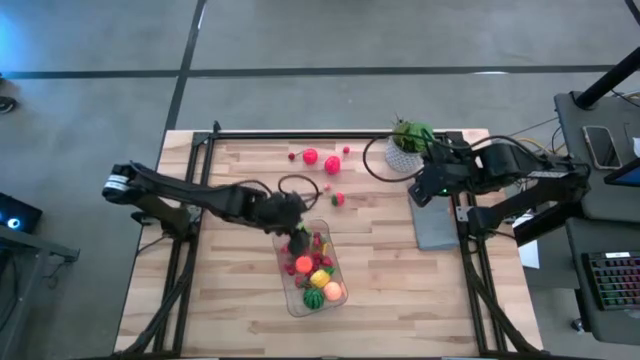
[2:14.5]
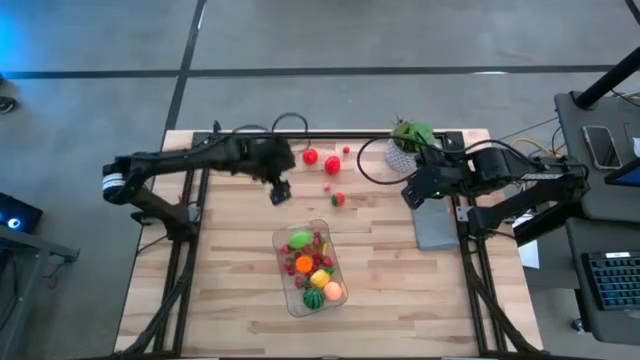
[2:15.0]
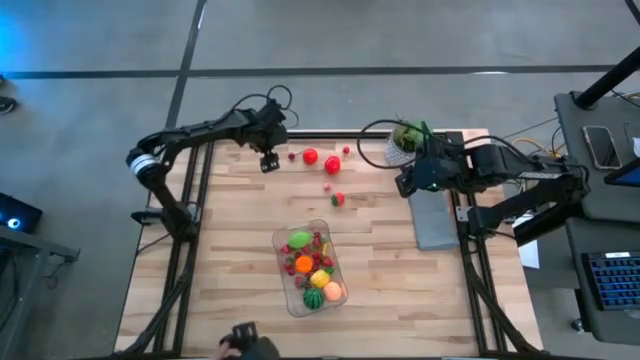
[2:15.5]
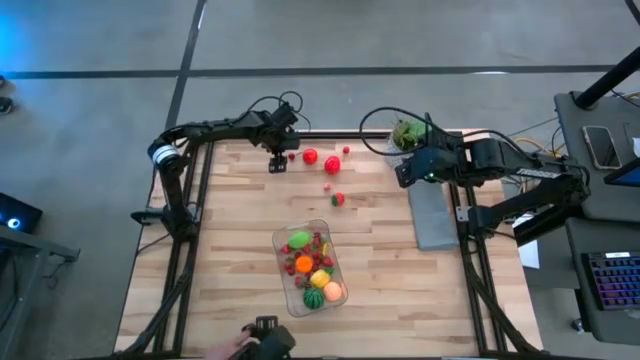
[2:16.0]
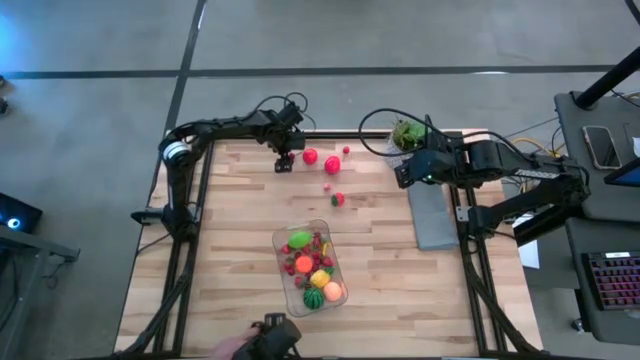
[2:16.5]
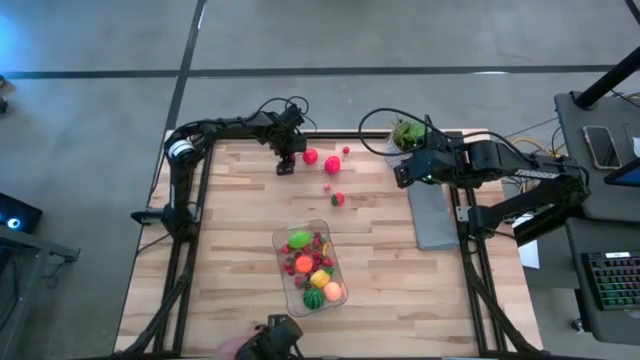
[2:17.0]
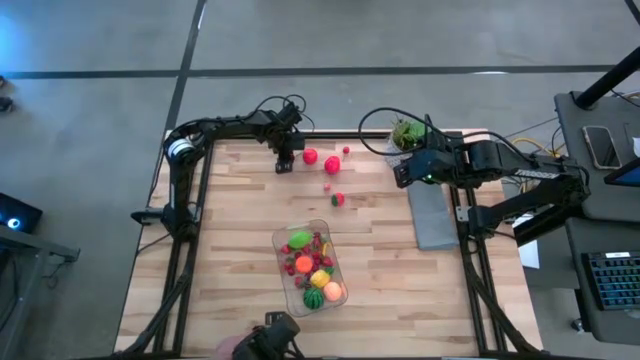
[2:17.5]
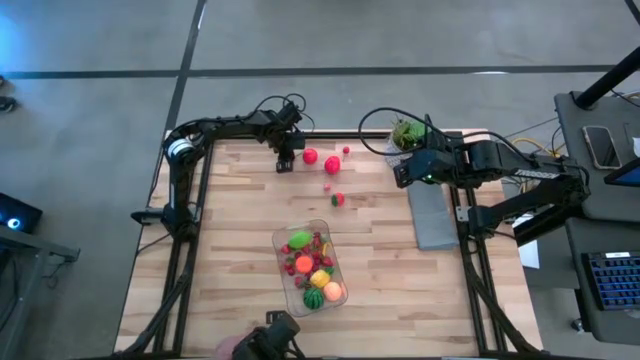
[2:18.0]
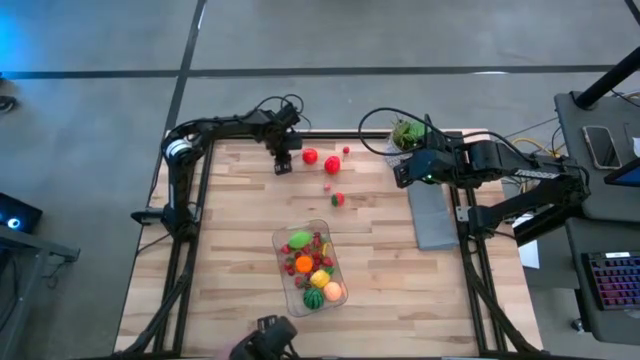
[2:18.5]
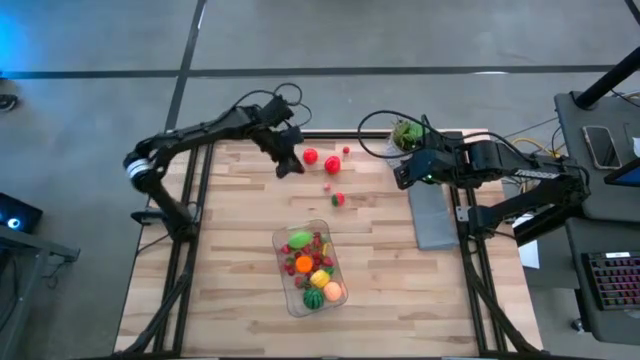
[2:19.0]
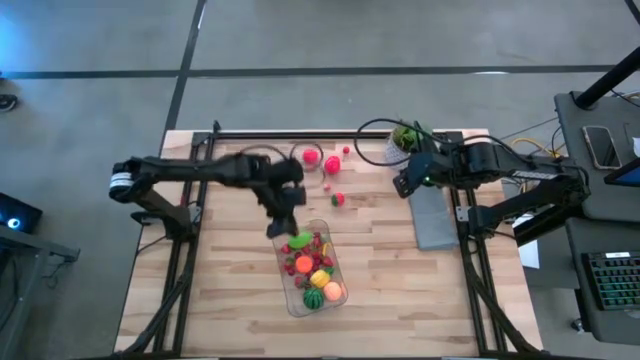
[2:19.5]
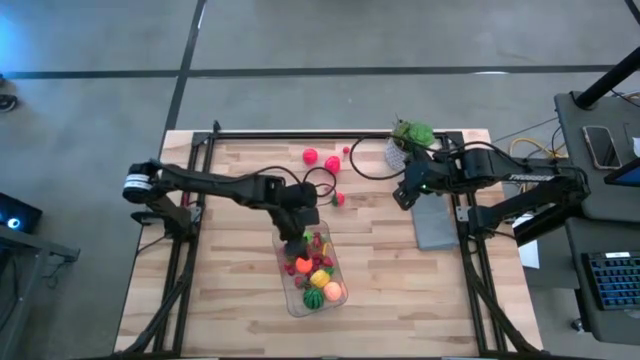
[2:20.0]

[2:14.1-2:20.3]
Task: Pick and placing Produce into tupperware
Put the red cherry into the transparent bin

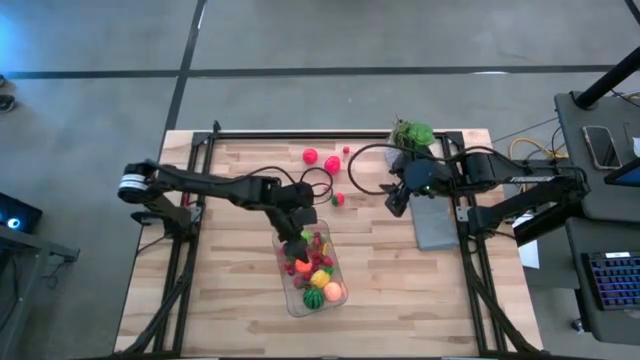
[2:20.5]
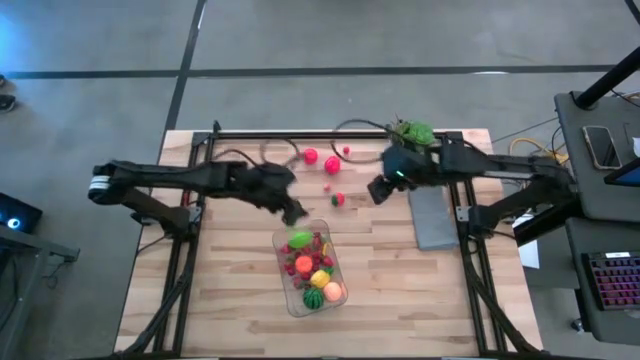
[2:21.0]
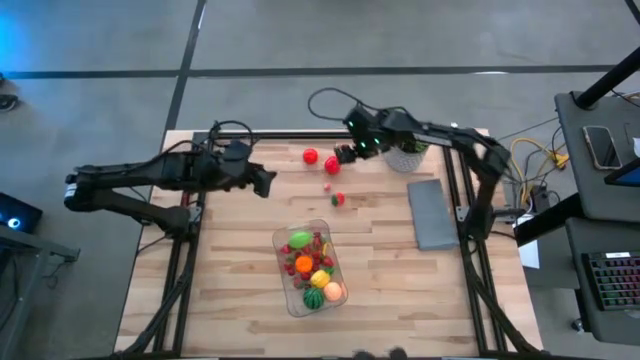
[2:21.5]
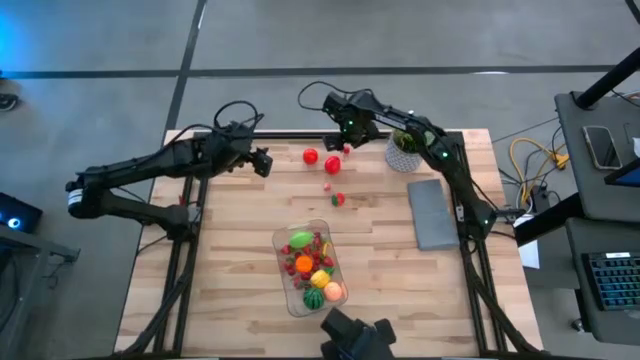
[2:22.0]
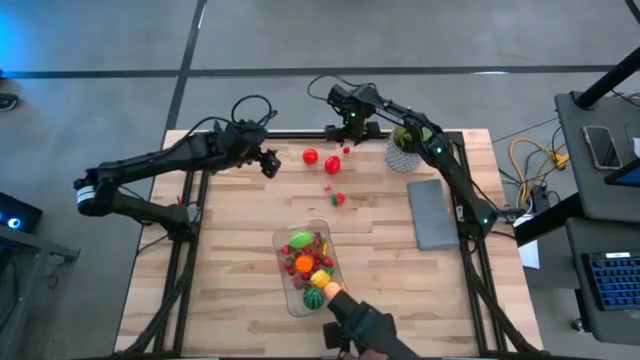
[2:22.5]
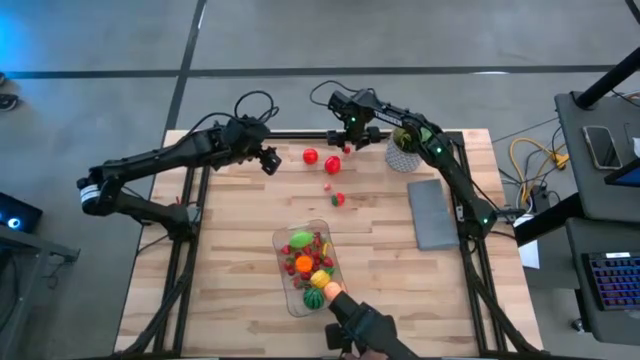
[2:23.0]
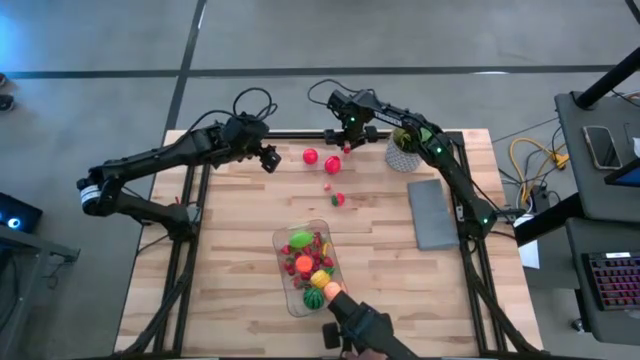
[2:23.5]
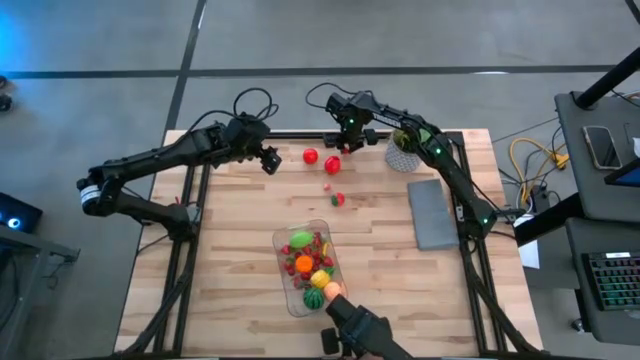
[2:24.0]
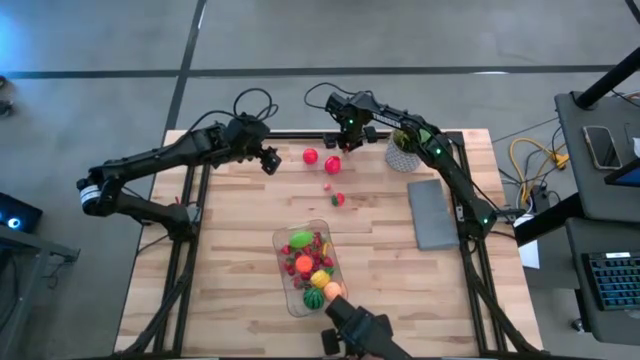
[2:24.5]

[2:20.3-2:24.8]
Put the red cherry into the transparent bin

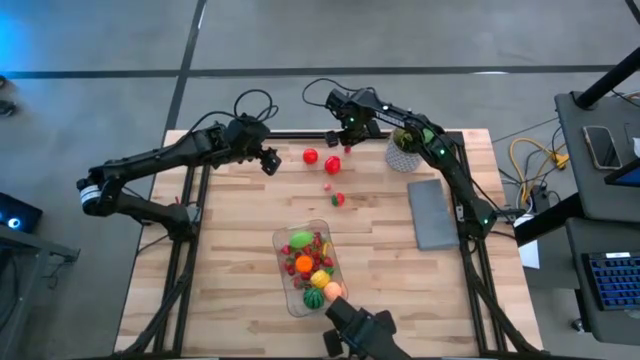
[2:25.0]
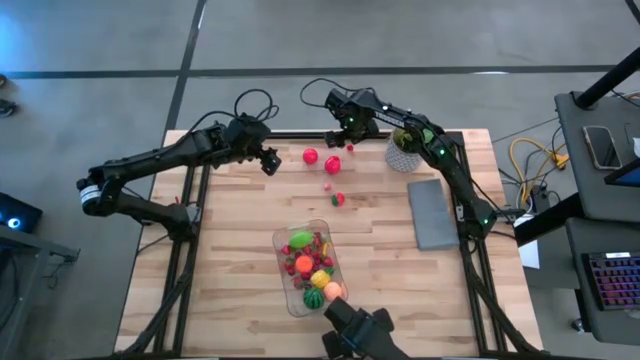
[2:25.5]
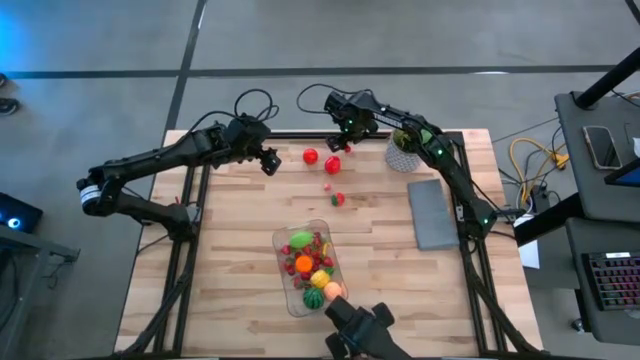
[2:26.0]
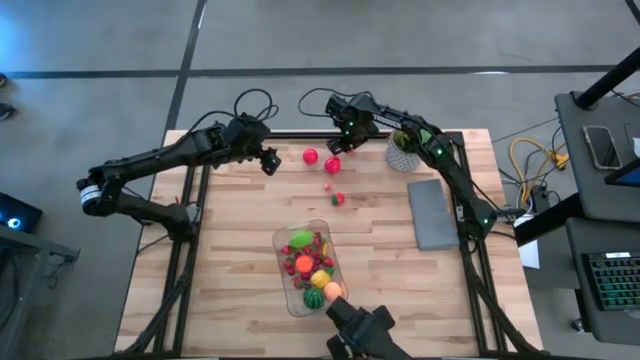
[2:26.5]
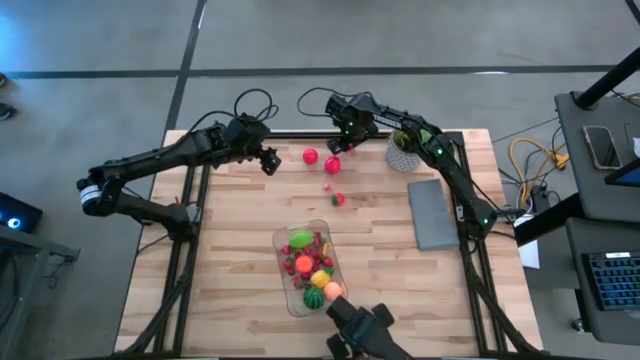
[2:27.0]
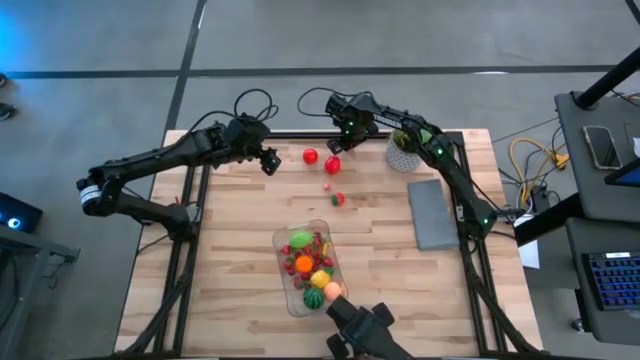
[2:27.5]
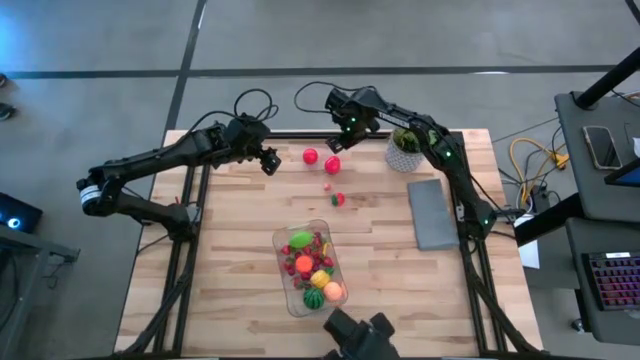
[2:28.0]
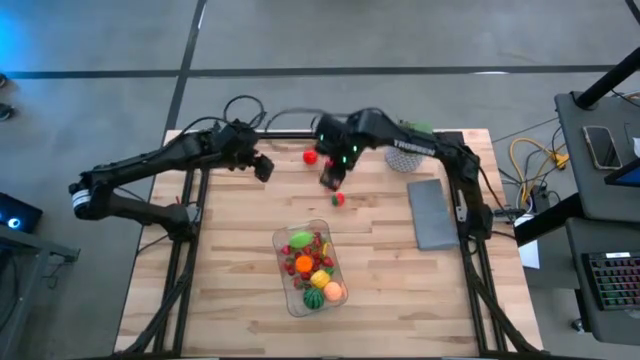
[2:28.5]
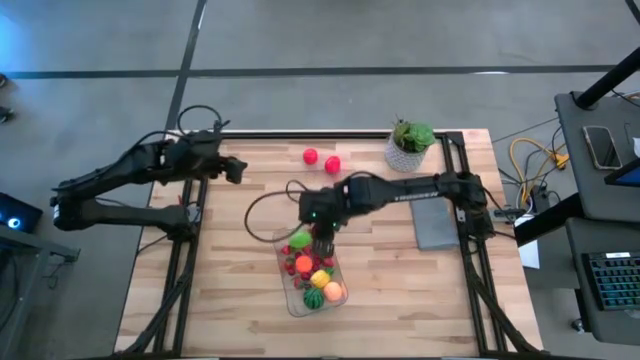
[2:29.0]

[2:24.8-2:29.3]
Put the red cherry into the transparent bin

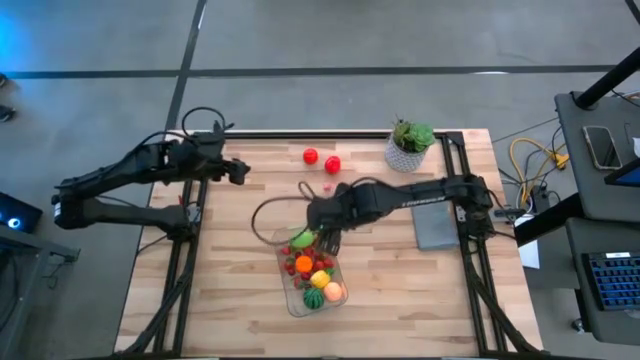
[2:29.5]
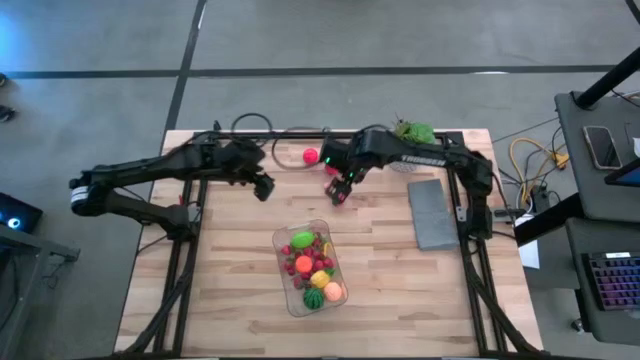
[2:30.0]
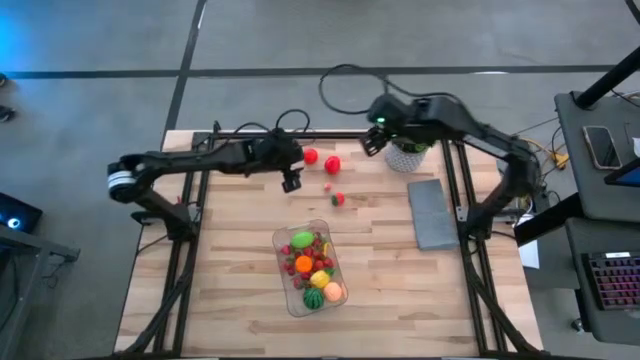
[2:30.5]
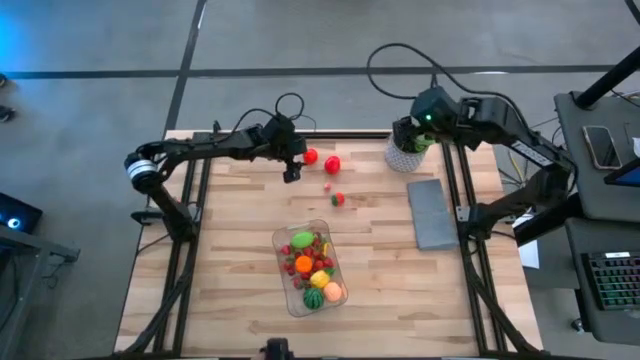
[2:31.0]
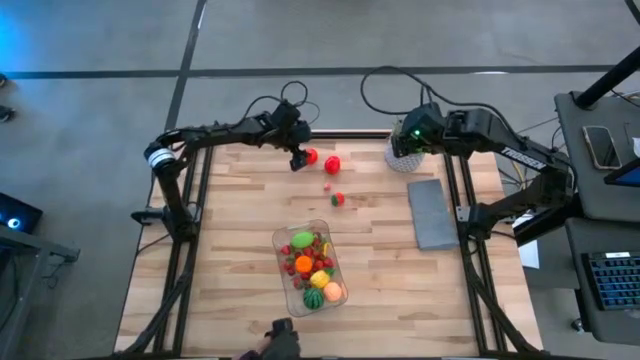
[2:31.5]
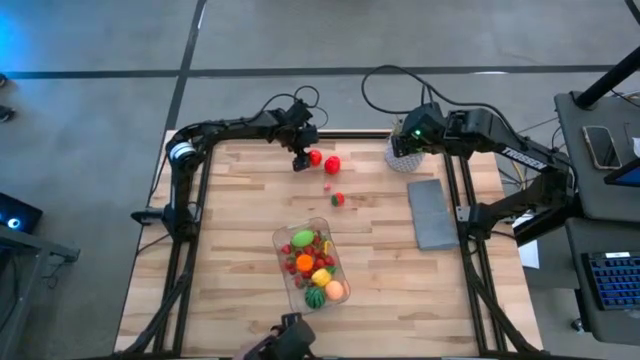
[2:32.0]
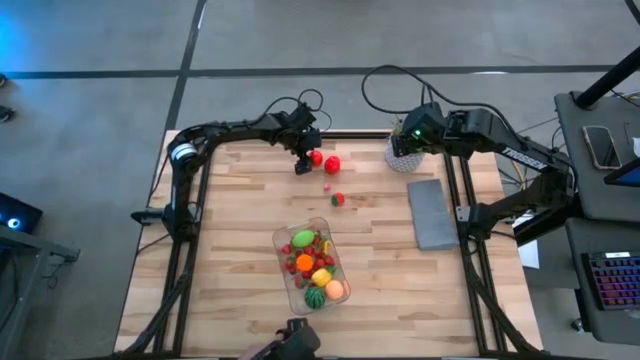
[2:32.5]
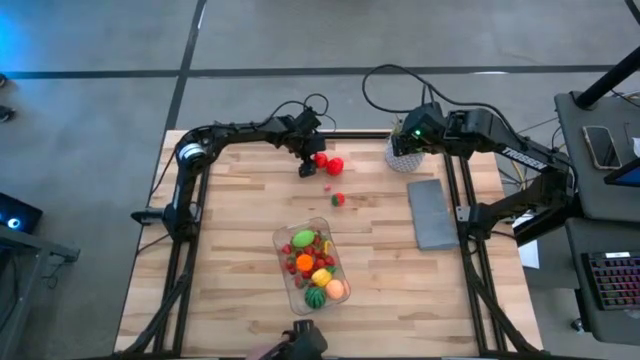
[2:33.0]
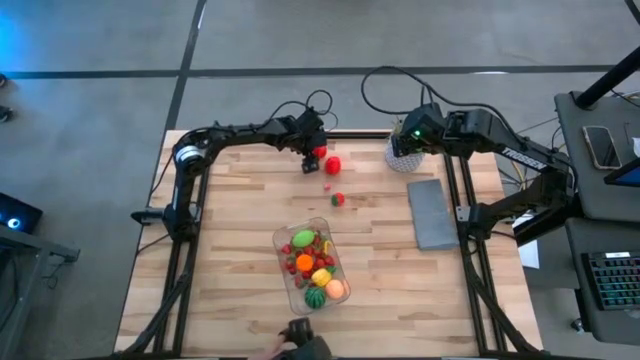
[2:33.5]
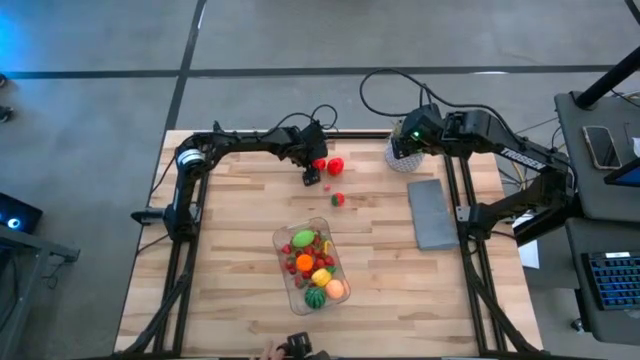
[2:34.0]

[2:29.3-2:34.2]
Put the red tomato into the transparent bin

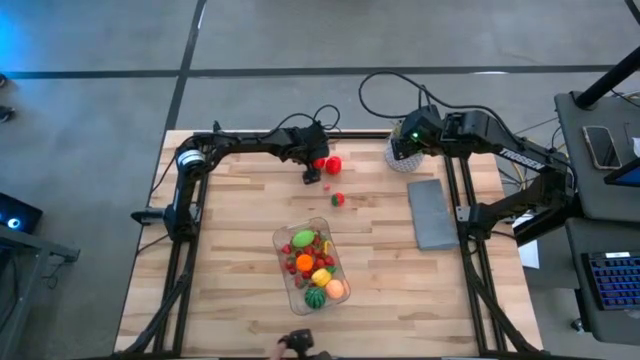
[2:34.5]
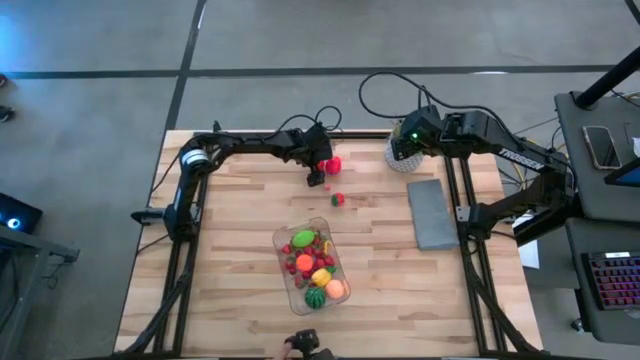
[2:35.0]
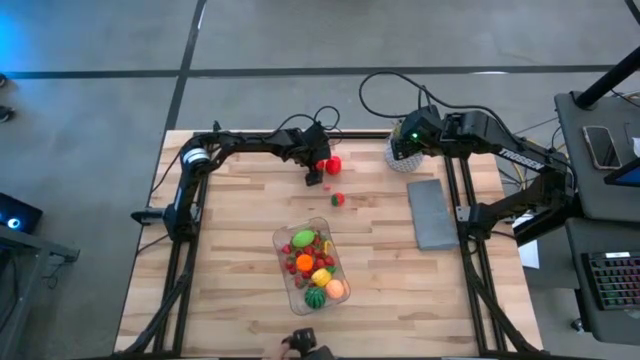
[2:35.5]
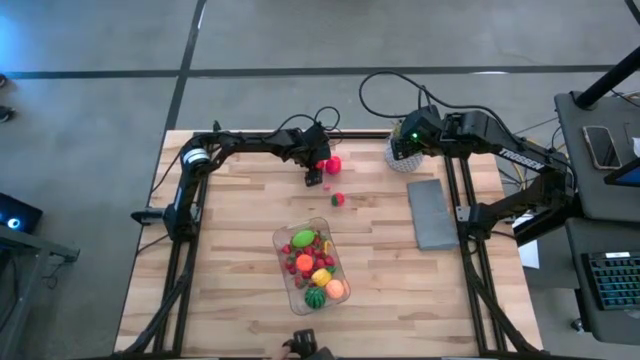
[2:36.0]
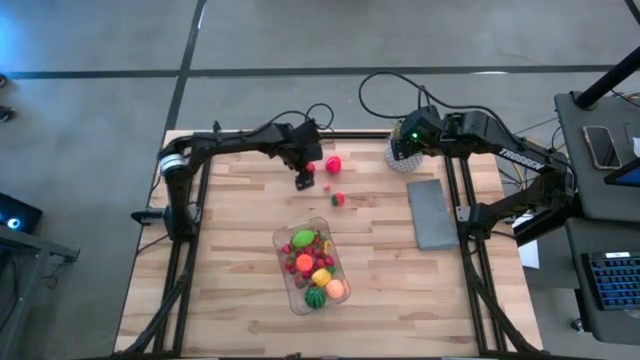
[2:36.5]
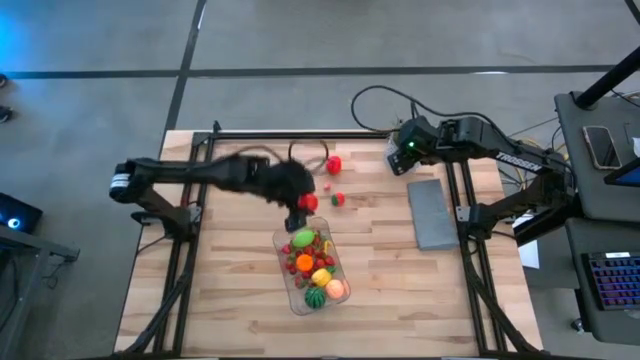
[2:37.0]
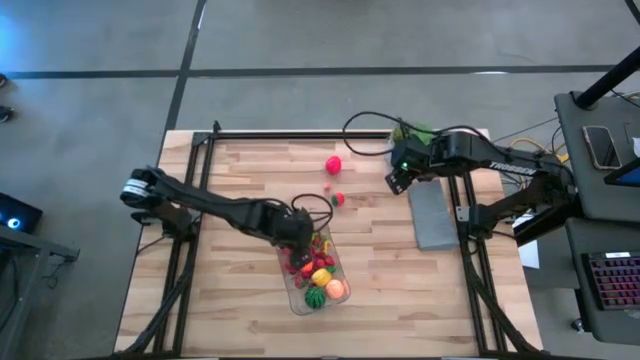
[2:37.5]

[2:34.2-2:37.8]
Put the red tomato into the transparent bin
